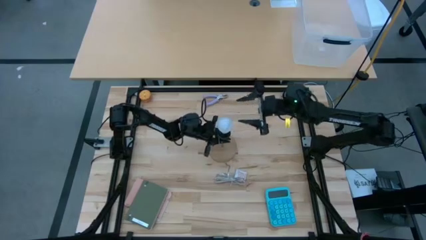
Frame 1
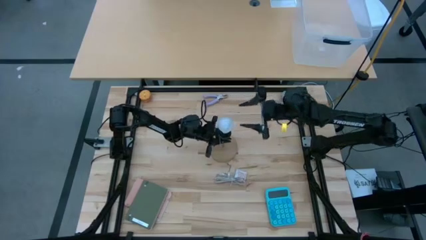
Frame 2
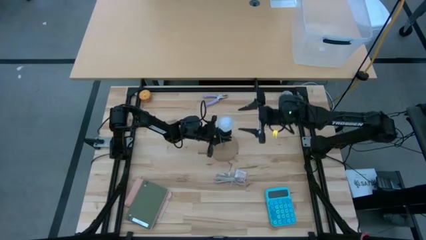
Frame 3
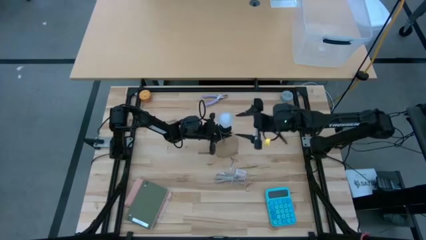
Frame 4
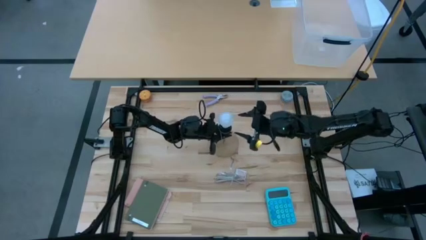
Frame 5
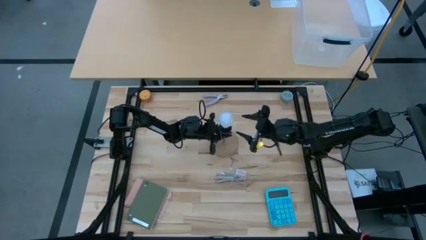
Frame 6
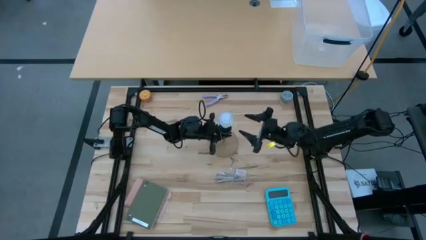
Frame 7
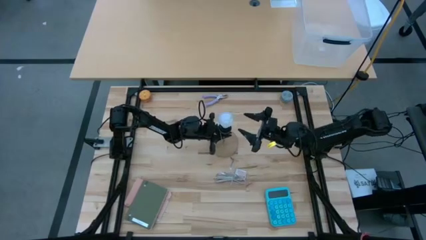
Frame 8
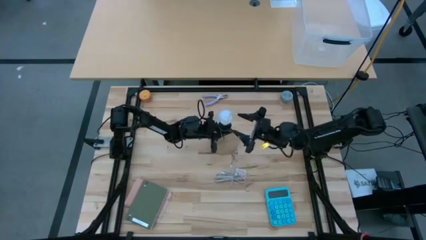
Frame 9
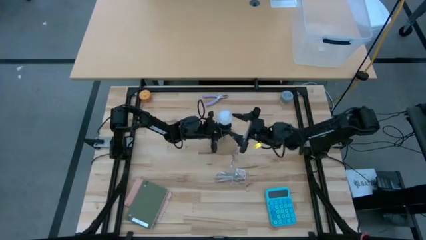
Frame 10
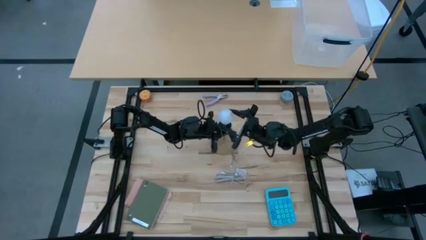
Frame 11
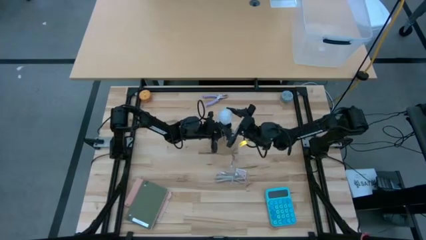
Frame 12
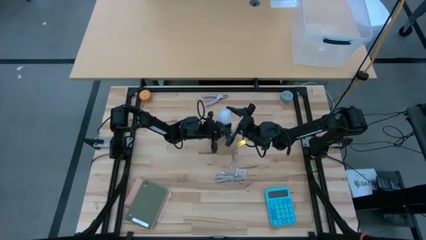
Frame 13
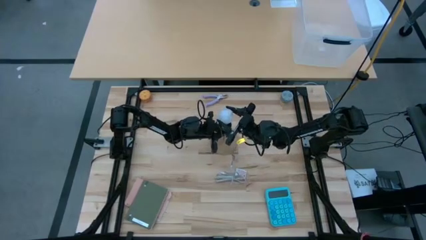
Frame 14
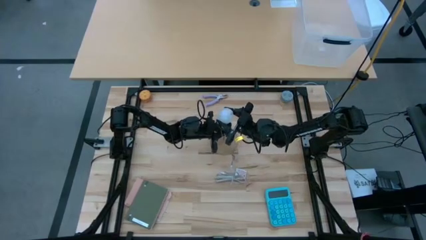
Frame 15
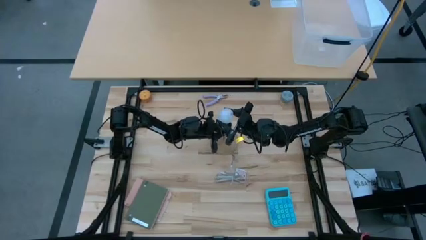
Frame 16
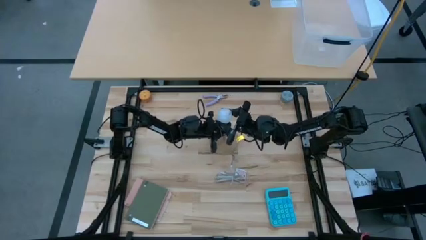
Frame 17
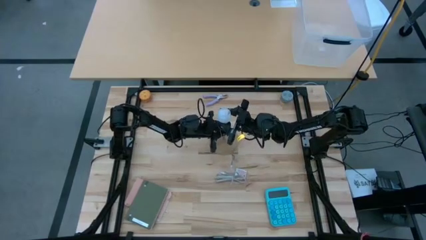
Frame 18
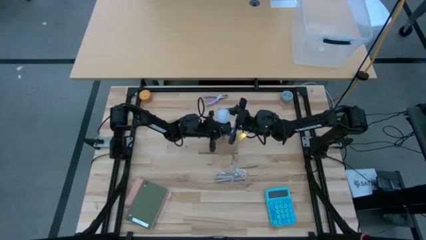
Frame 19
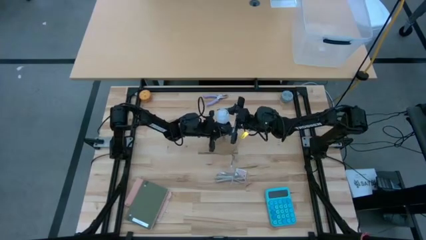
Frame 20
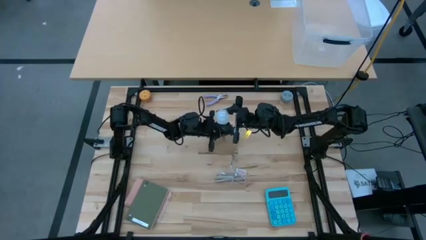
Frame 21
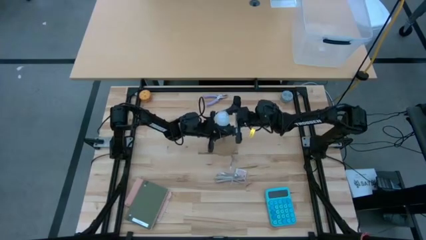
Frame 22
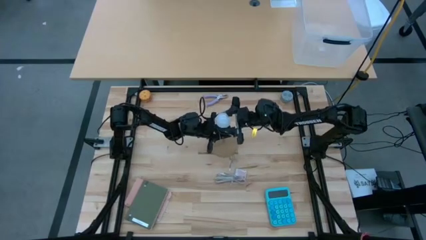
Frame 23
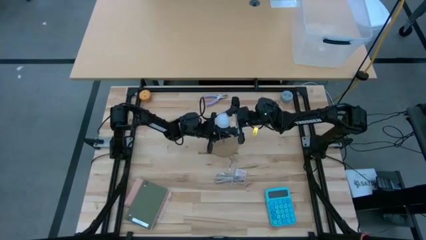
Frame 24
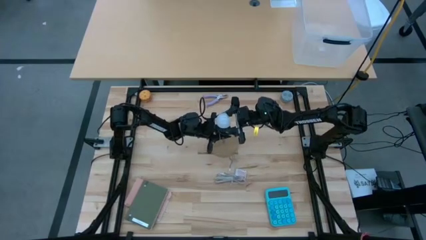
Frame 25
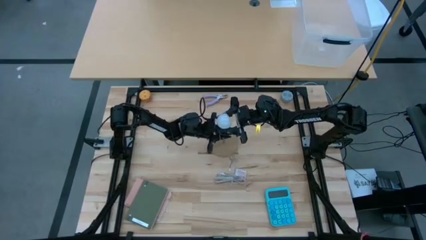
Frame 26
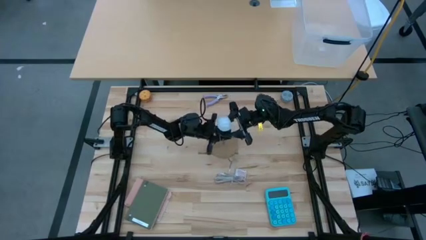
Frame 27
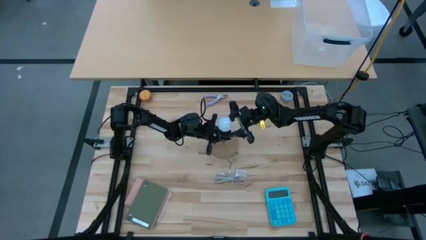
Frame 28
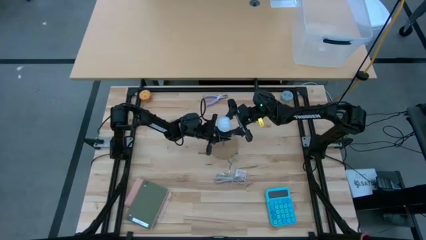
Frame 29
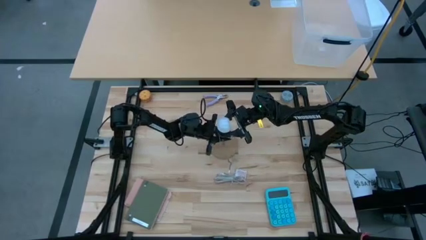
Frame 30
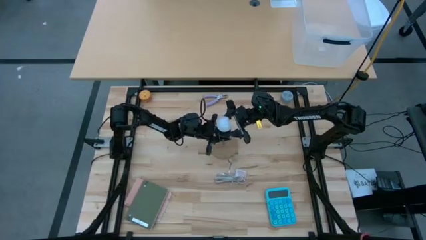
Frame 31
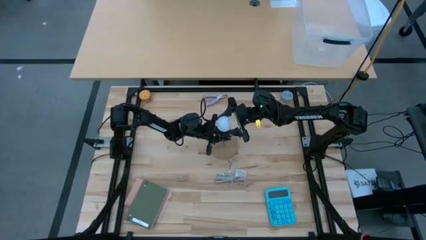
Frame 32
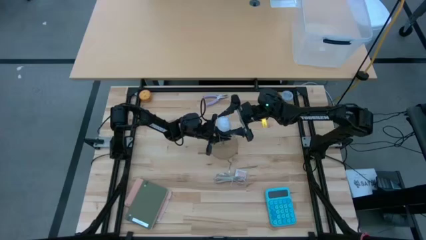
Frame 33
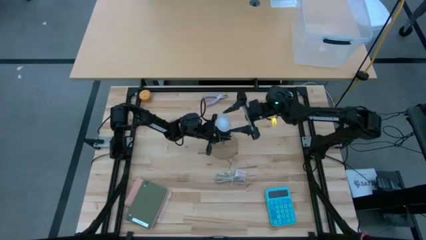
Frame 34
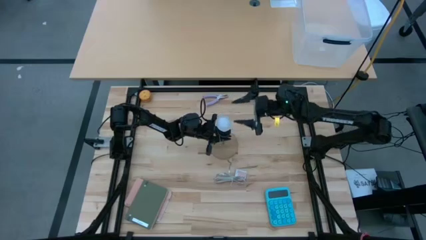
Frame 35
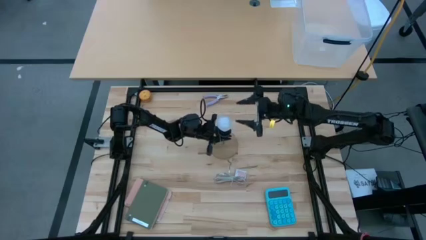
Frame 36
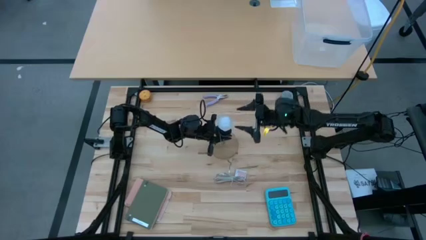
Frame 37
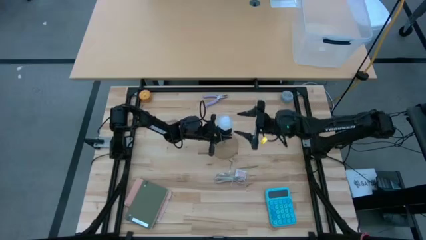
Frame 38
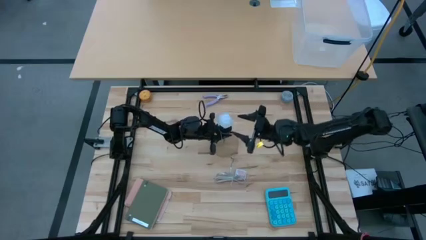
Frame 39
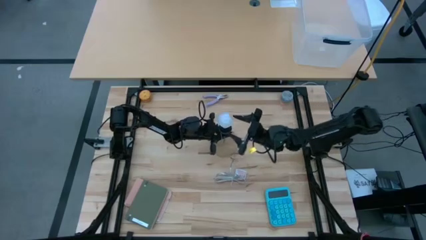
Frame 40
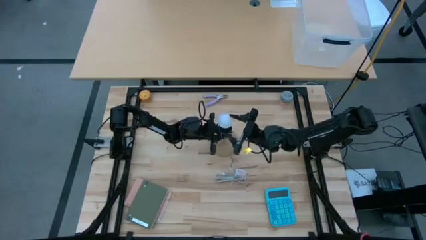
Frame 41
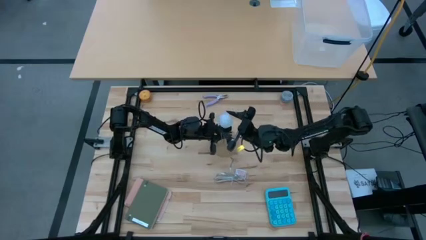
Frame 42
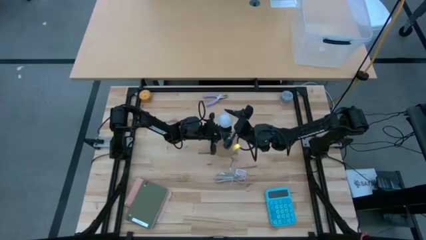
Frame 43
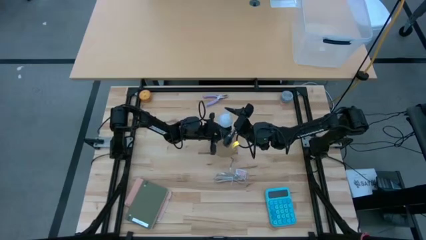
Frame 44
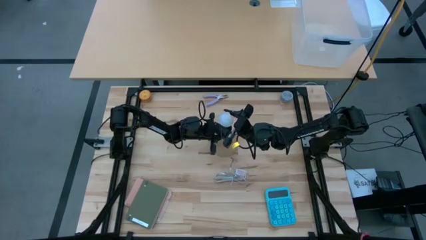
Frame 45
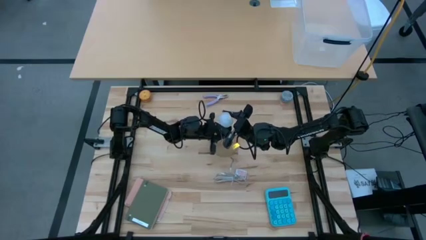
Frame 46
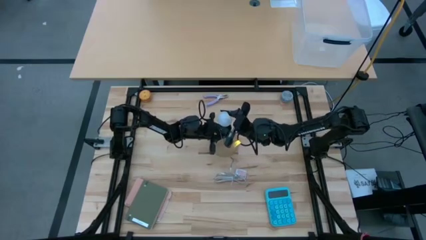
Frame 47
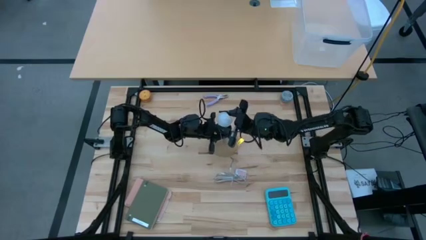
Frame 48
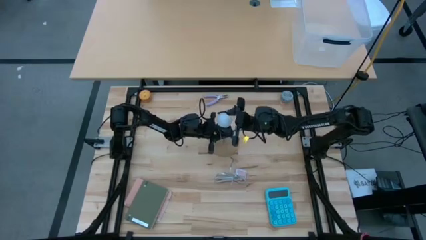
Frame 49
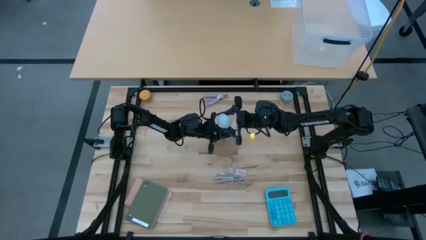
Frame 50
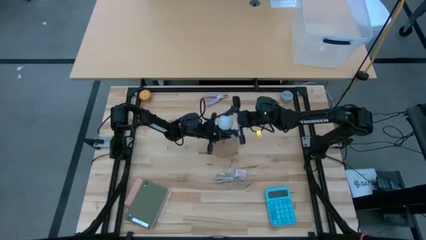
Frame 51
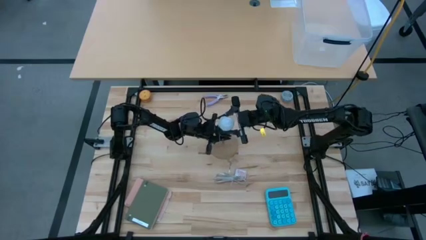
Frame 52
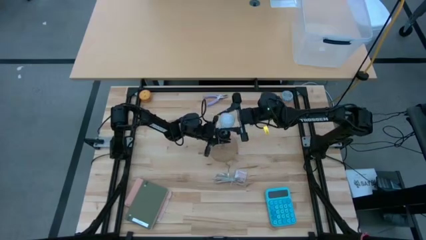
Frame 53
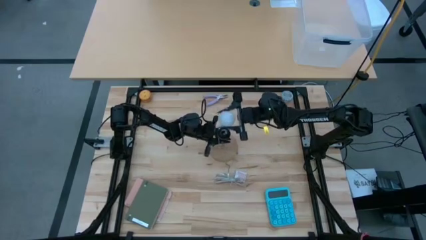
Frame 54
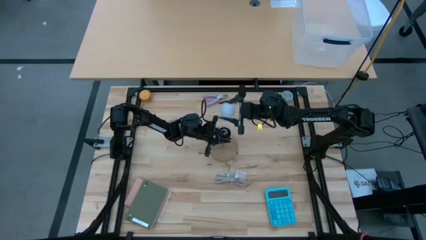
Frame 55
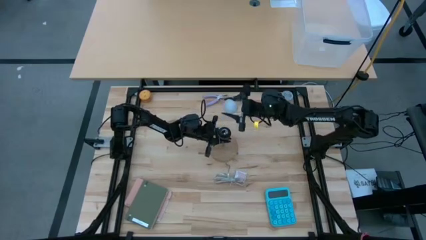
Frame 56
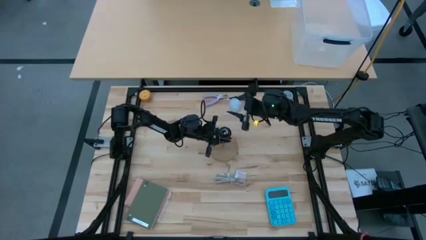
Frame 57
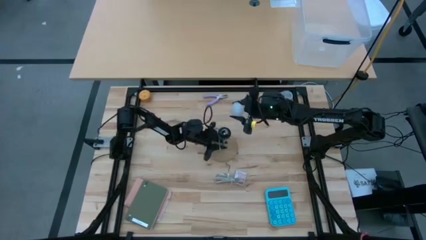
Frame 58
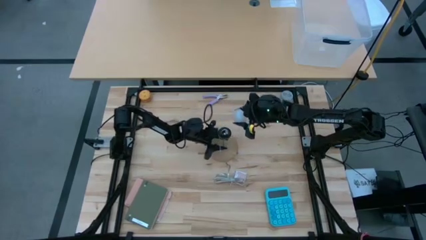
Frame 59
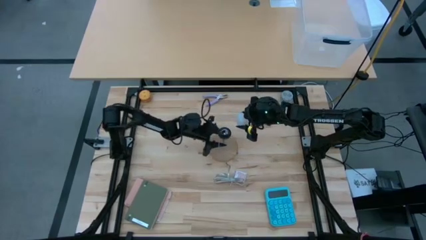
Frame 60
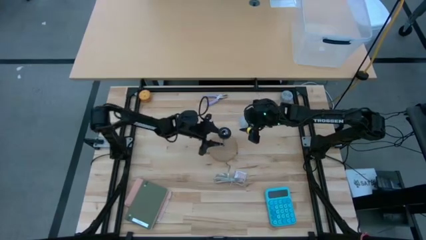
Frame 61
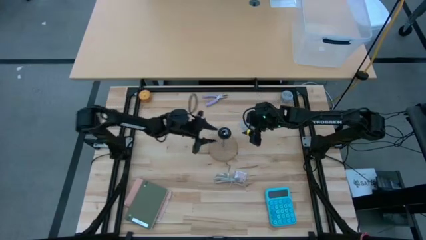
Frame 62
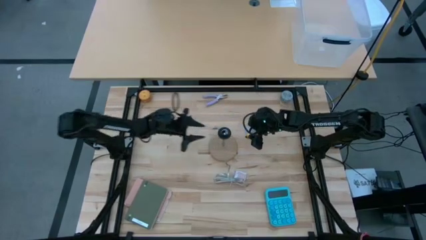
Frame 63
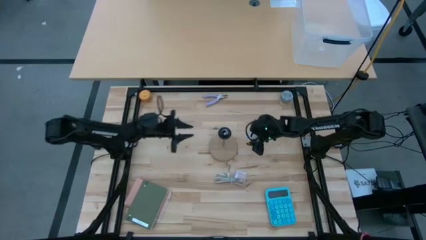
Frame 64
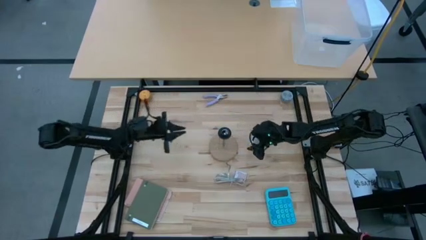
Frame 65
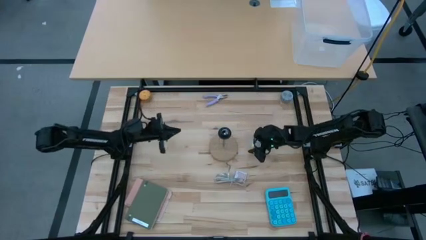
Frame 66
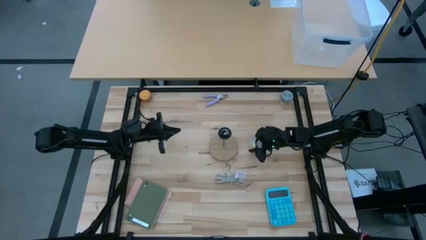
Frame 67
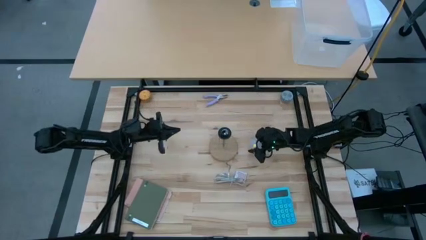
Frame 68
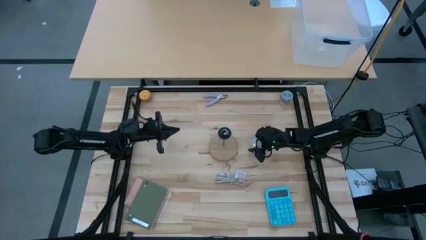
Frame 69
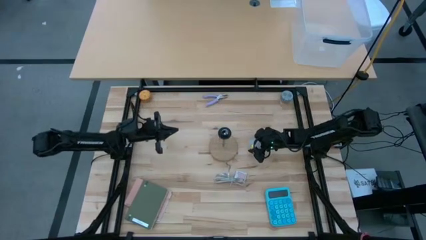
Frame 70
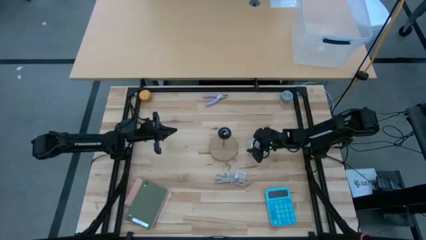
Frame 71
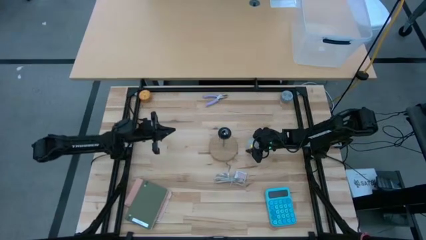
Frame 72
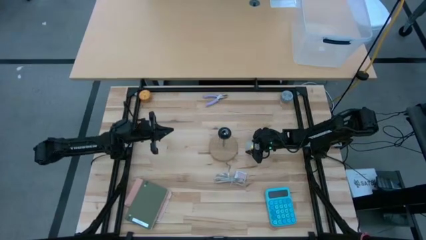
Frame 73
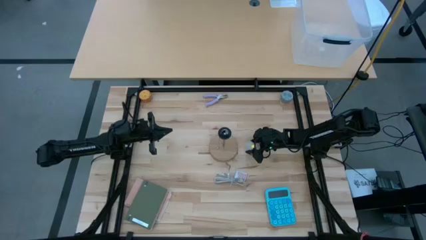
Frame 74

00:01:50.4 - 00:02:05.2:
Task: Screw lightbulb
Remove the light bulb from the brown lamp

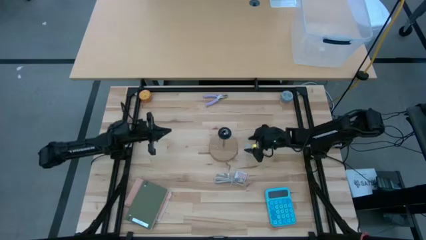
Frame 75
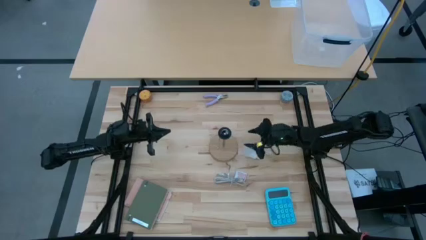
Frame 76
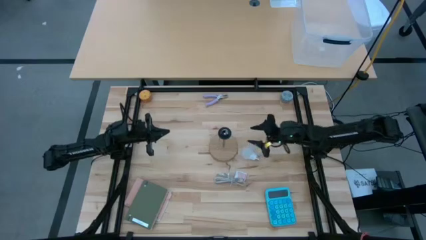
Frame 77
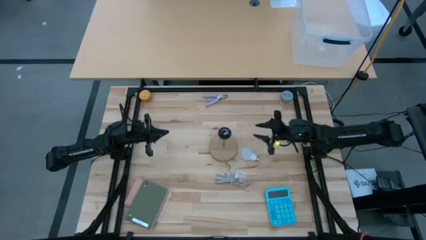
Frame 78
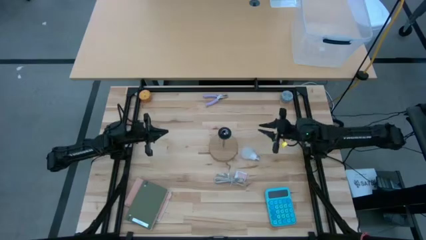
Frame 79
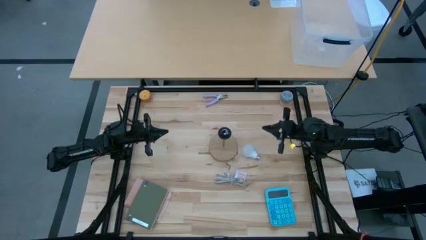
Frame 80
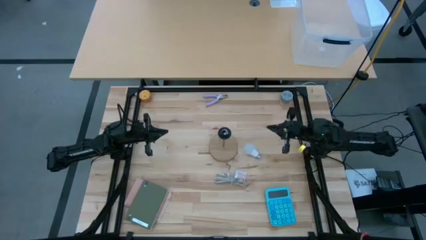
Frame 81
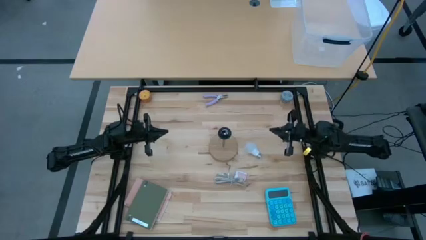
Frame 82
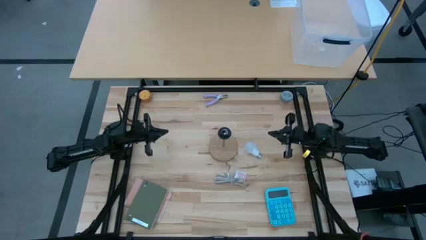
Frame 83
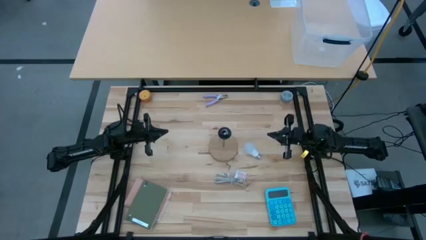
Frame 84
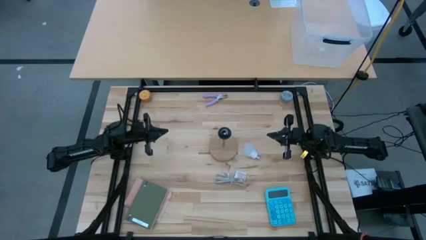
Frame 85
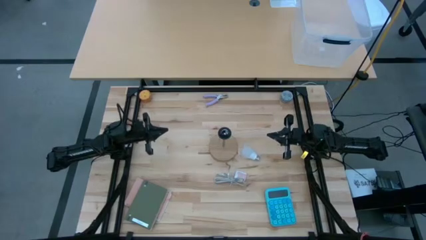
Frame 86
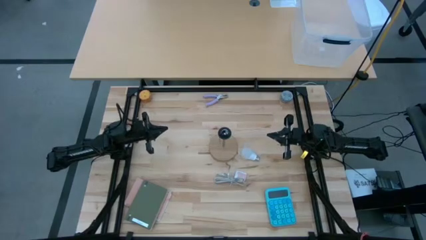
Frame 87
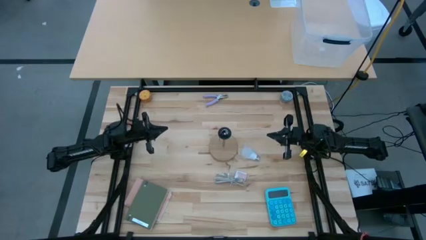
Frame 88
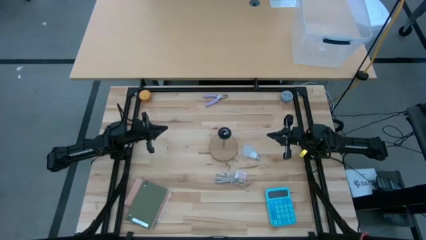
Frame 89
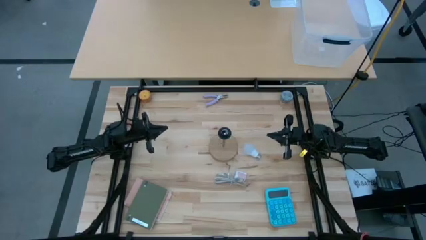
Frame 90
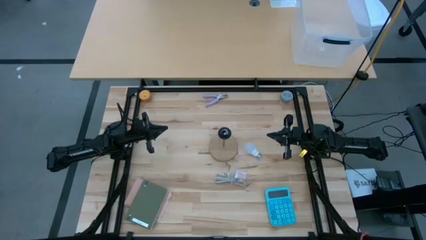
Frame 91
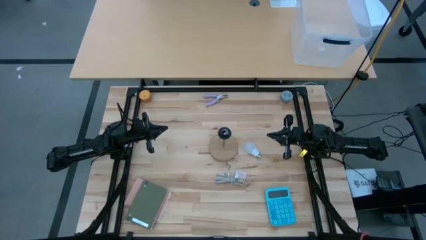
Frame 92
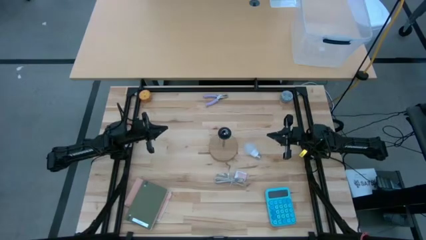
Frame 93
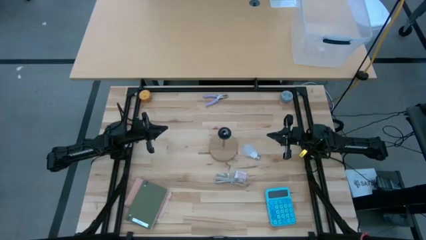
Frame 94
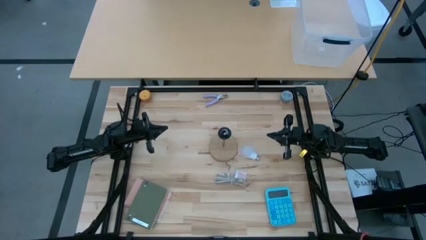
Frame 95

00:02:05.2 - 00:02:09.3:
Return to Home Position
